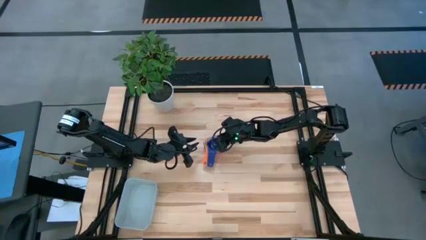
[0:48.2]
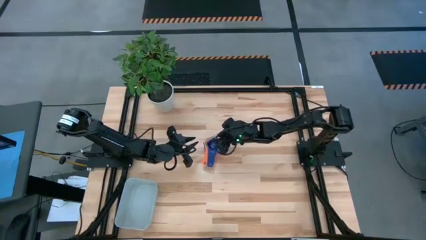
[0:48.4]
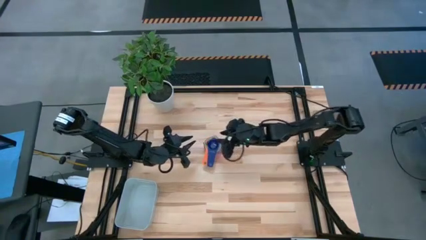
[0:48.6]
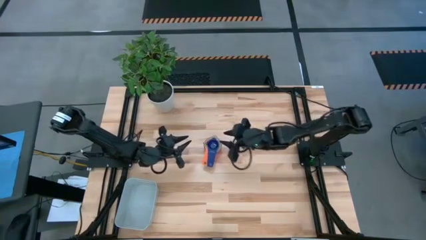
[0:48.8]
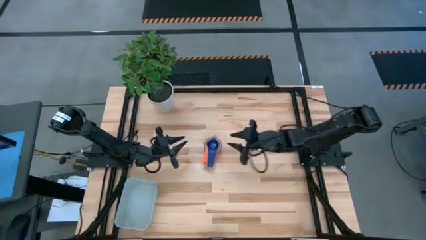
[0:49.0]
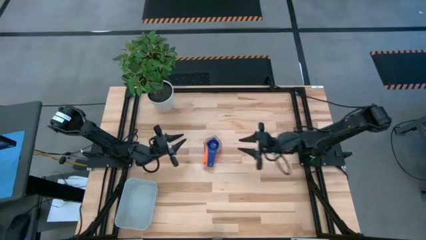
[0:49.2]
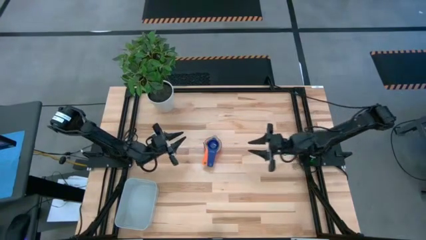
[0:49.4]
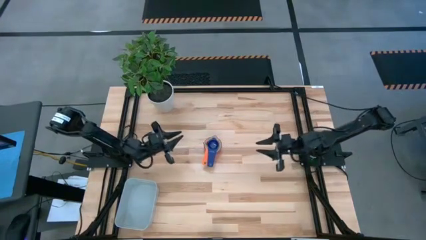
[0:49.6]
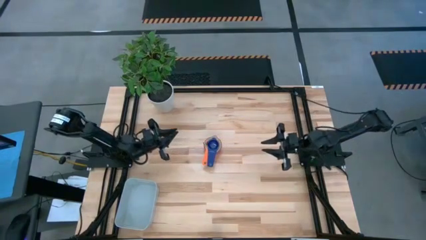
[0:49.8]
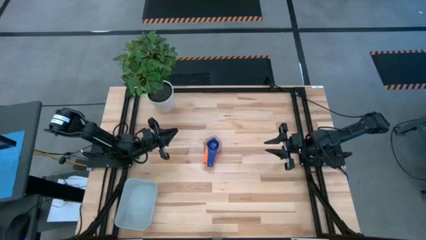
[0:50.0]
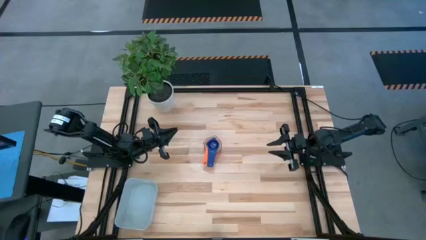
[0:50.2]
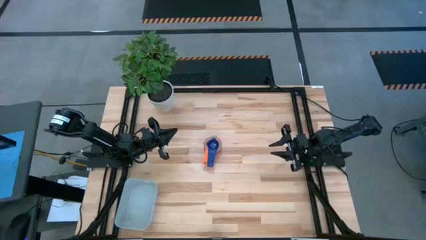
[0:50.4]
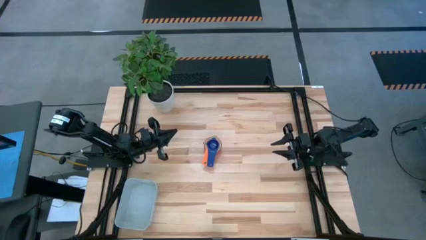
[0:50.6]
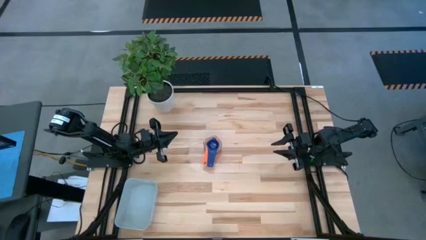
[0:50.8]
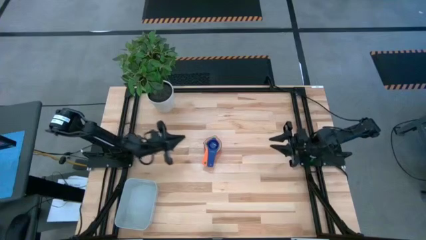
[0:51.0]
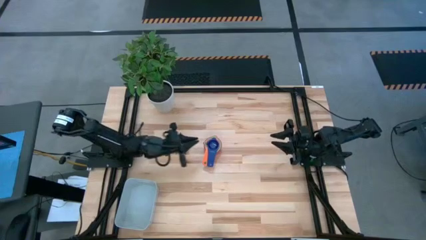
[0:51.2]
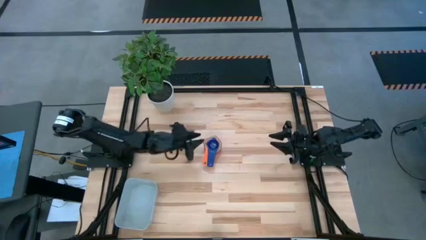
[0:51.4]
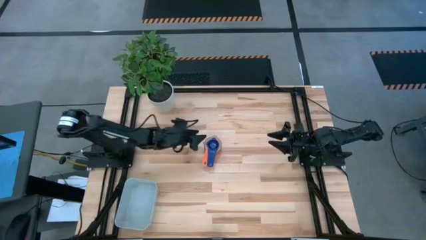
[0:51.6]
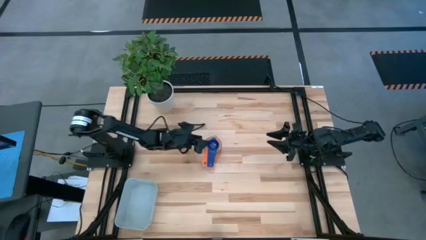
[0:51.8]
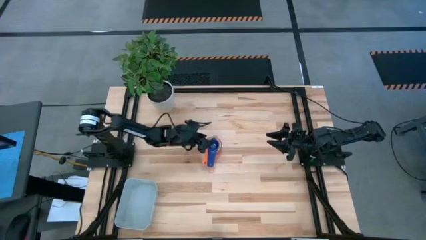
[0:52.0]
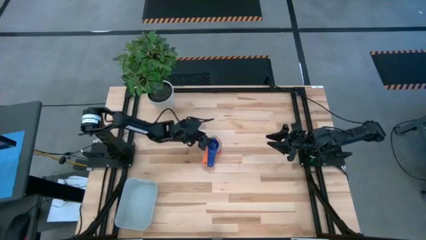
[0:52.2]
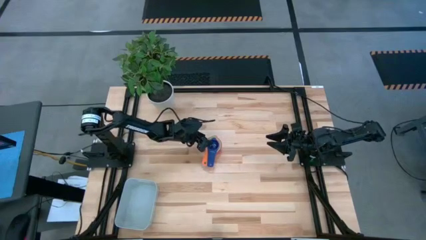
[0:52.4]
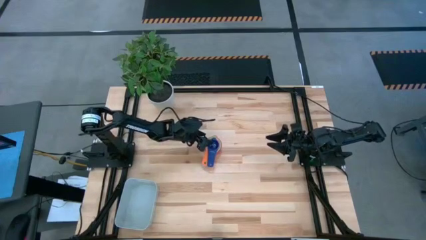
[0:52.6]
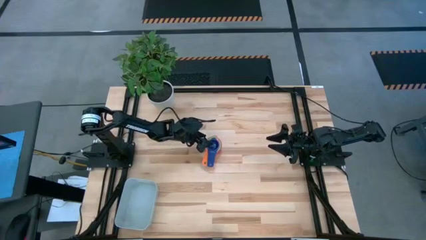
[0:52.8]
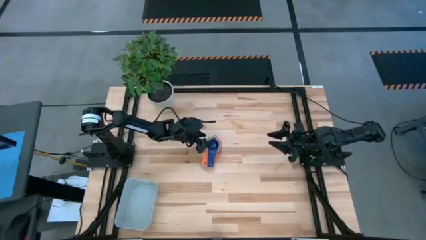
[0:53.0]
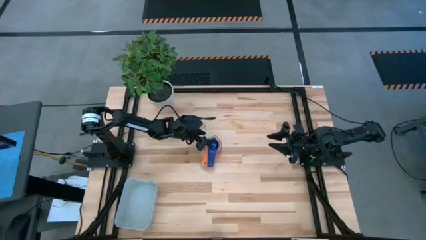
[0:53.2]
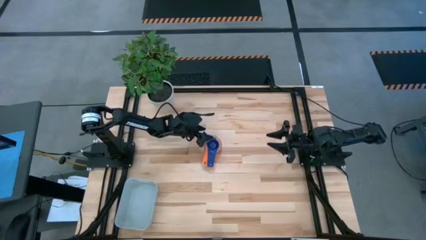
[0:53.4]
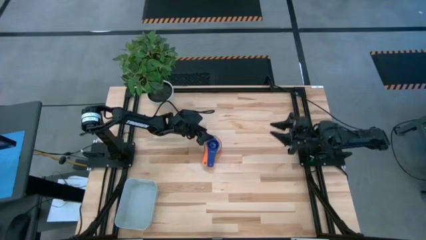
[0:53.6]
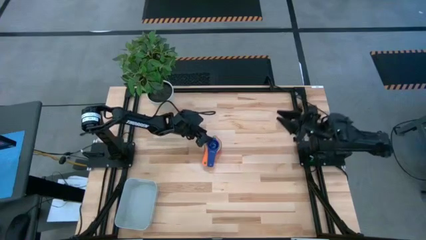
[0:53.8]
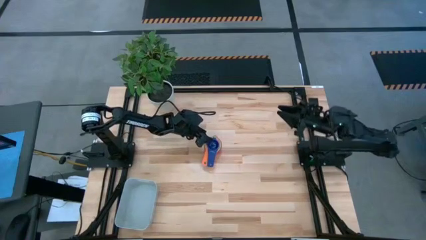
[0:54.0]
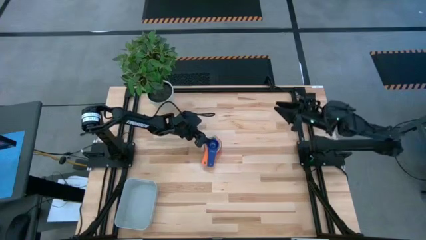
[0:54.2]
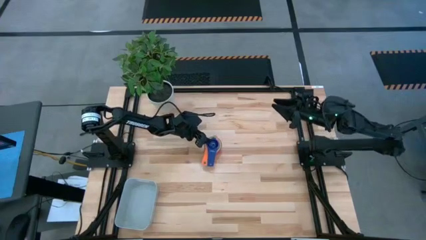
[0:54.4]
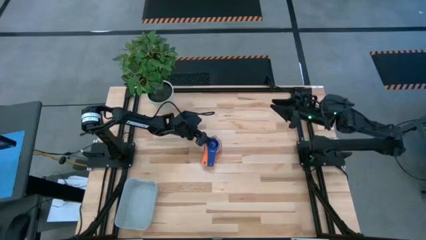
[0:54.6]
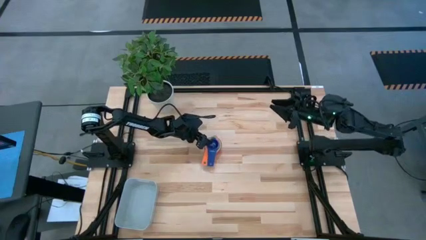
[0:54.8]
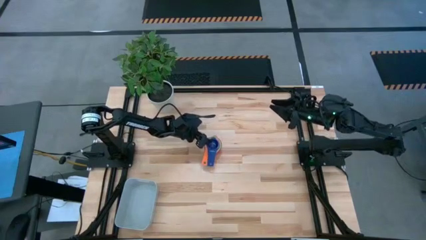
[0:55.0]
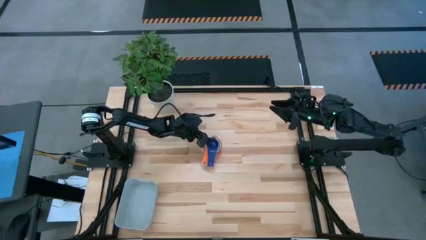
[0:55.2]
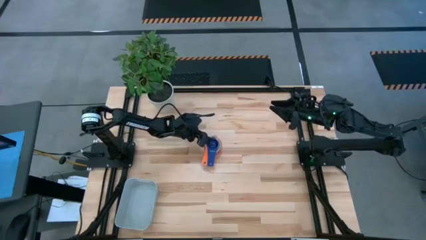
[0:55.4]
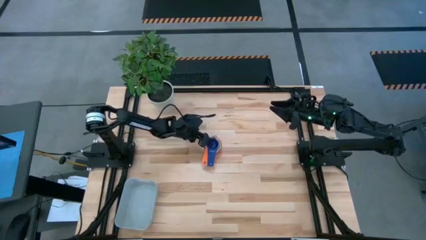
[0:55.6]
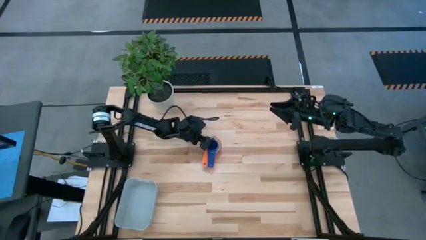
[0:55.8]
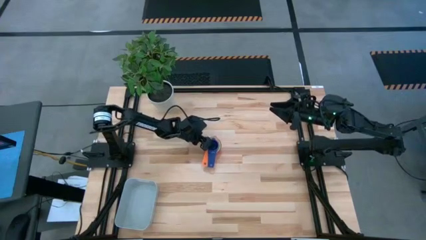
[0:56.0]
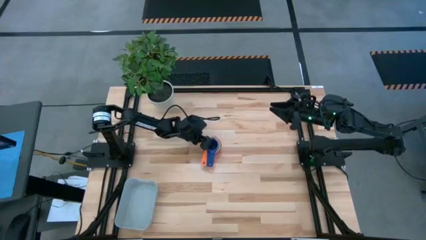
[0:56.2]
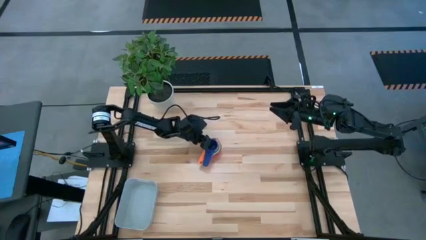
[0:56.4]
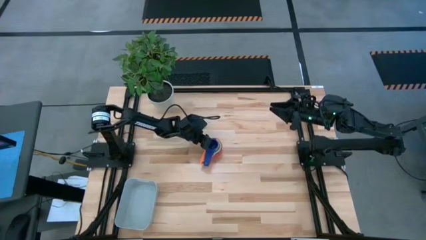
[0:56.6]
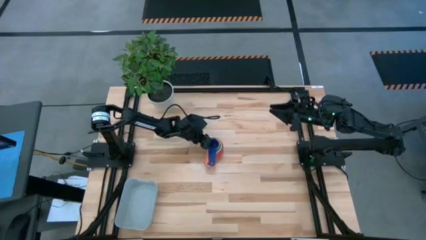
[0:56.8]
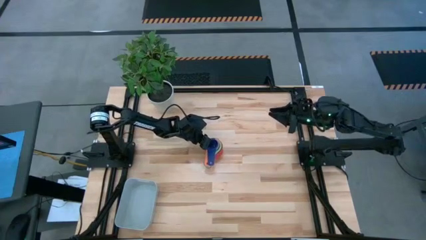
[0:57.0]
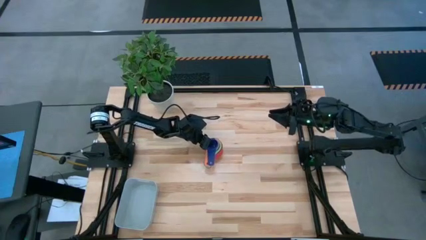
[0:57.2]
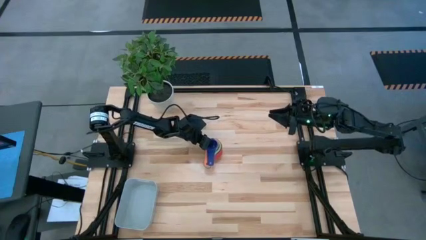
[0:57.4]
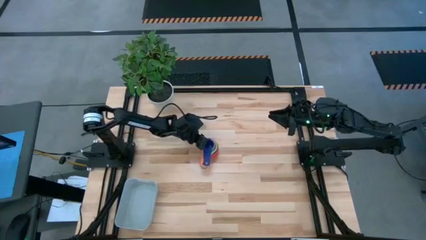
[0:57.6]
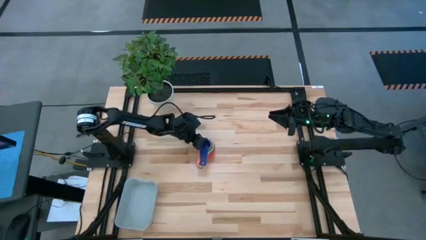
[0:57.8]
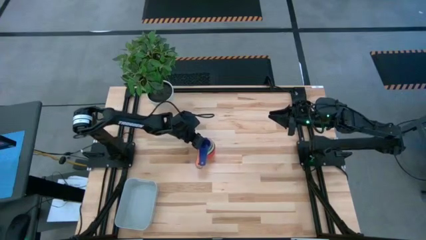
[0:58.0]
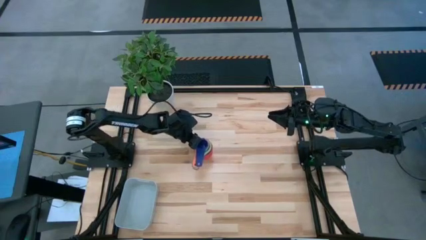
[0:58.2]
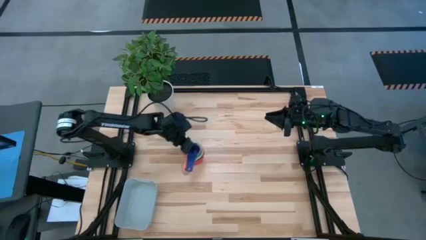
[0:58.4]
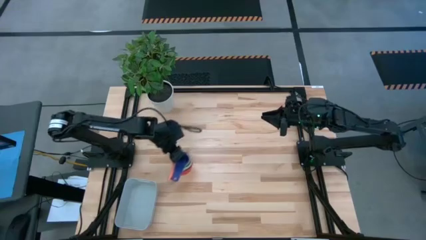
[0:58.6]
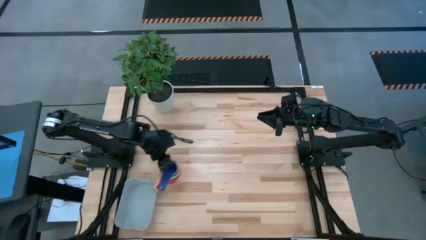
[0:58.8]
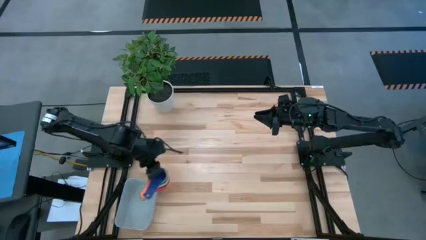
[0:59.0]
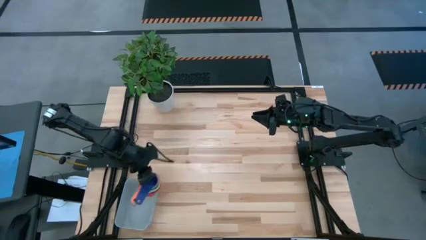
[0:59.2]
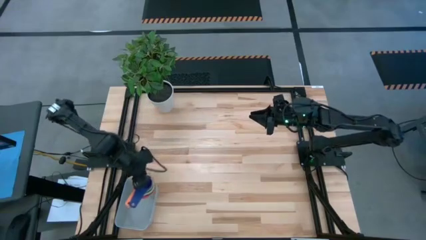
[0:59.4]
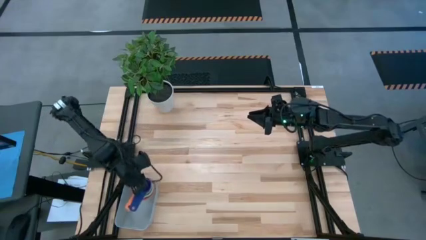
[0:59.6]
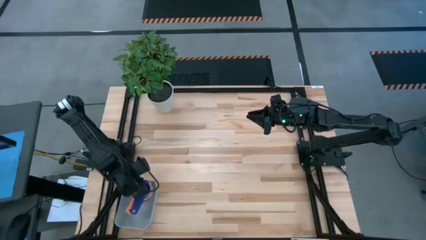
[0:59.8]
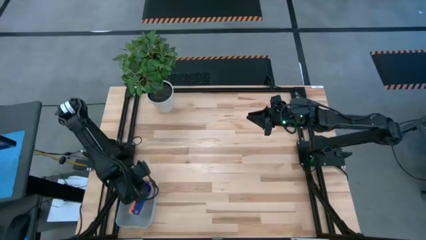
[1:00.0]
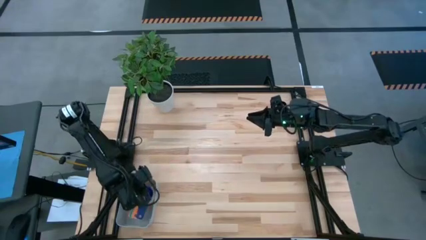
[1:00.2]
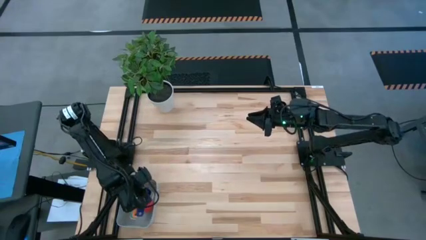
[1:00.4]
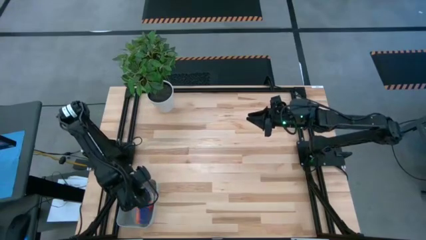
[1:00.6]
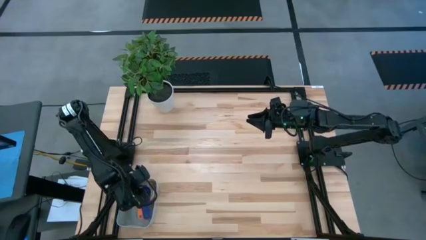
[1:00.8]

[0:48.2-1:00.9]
Task: Nest measuring cups in basket
Put the stacked measuring cups into the gray bin
